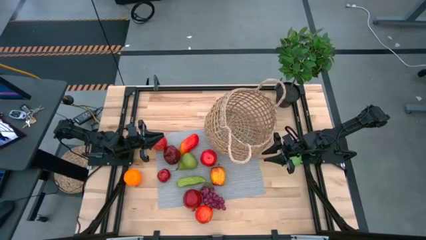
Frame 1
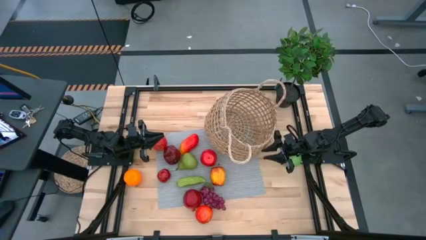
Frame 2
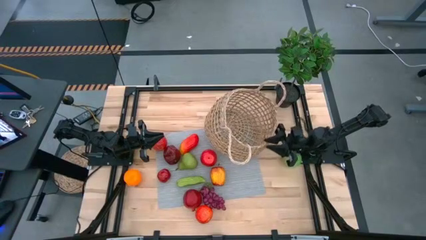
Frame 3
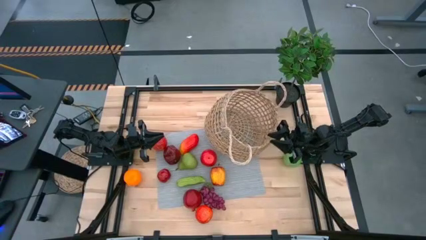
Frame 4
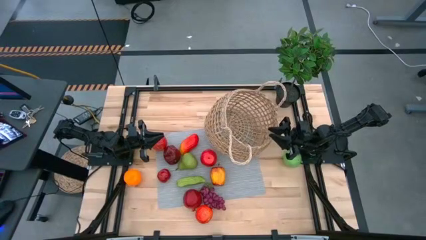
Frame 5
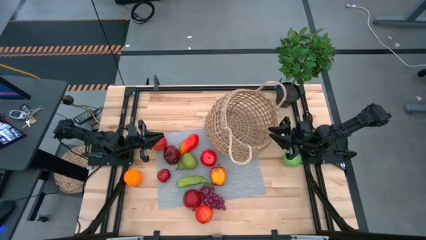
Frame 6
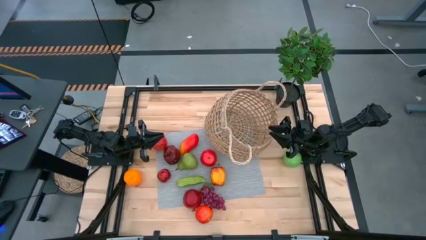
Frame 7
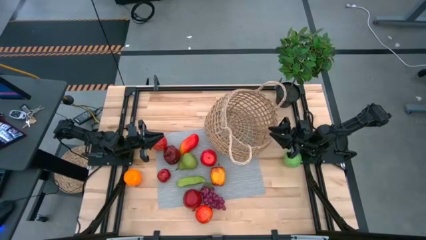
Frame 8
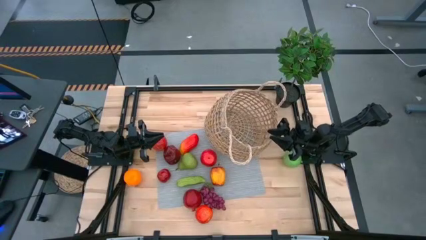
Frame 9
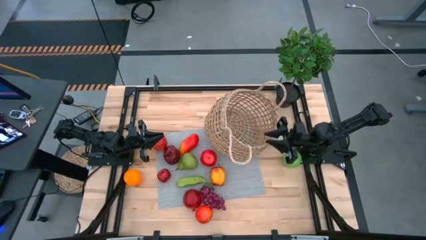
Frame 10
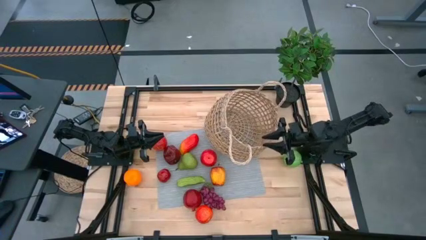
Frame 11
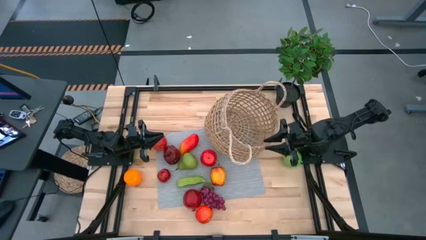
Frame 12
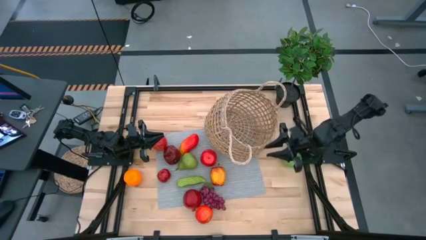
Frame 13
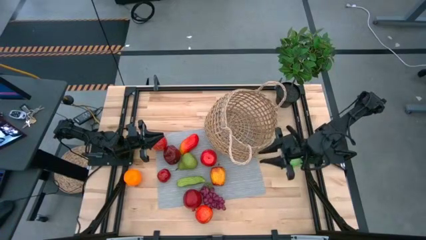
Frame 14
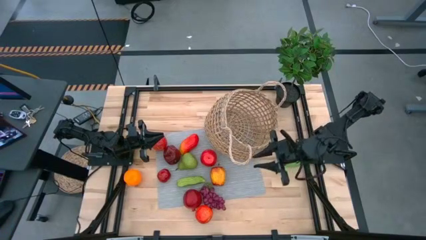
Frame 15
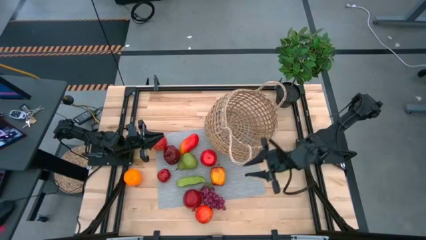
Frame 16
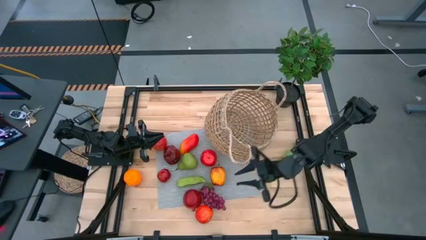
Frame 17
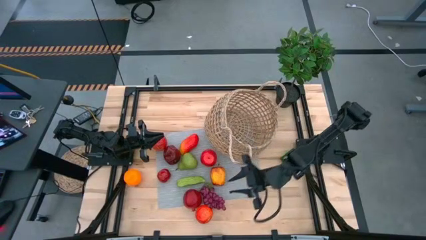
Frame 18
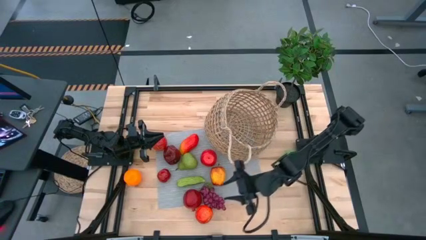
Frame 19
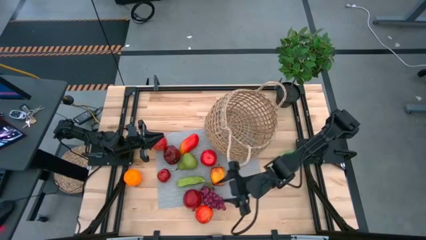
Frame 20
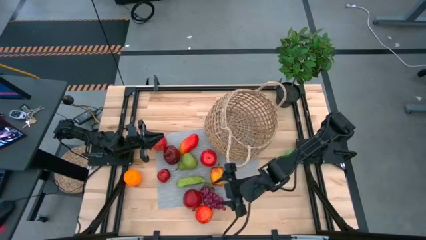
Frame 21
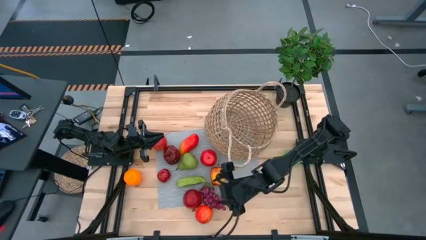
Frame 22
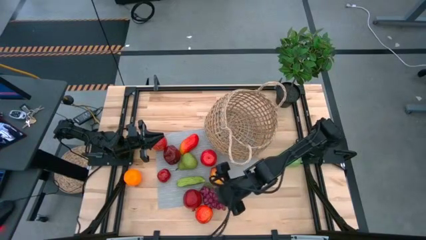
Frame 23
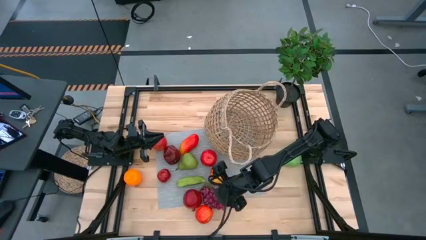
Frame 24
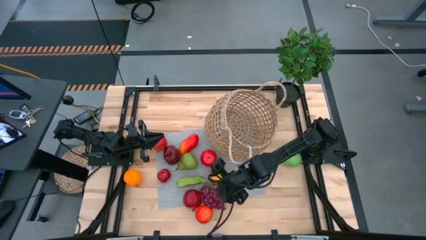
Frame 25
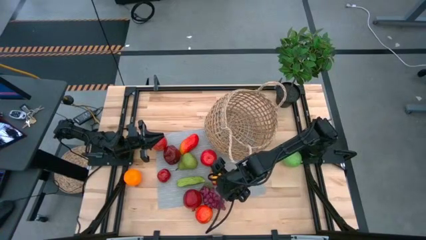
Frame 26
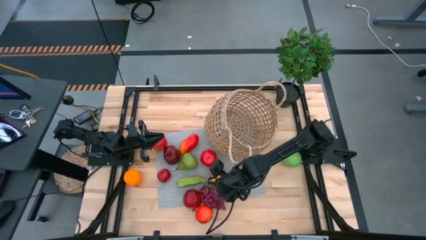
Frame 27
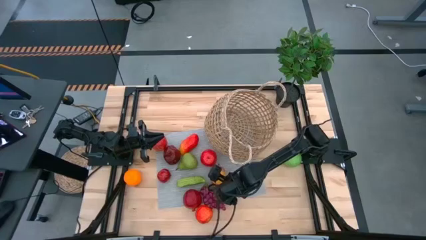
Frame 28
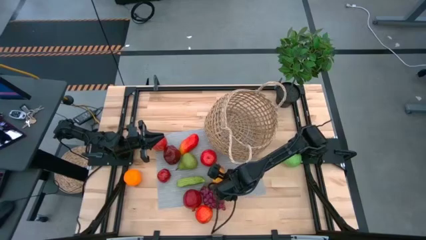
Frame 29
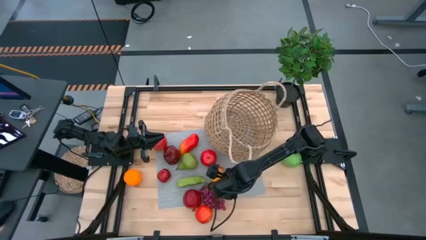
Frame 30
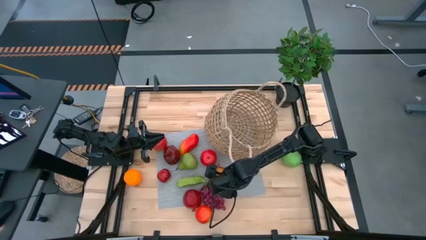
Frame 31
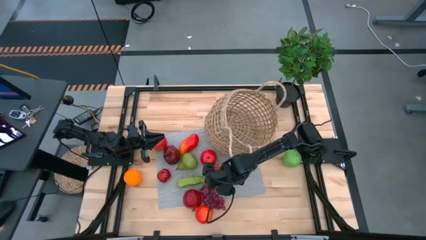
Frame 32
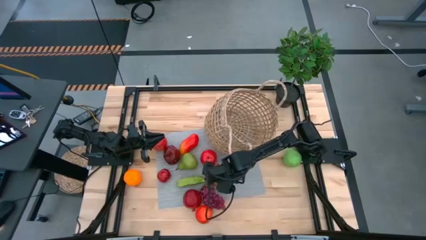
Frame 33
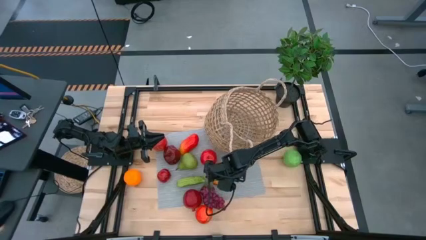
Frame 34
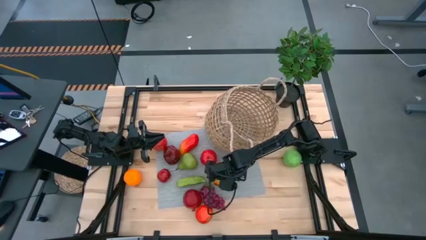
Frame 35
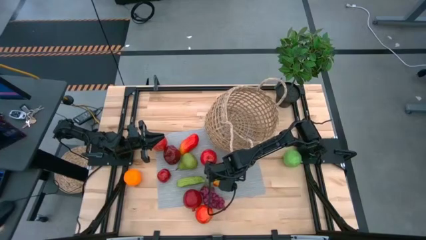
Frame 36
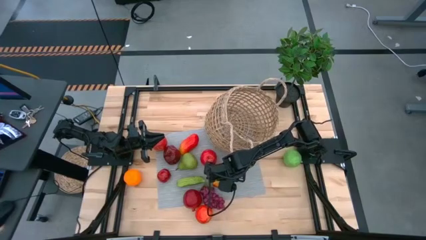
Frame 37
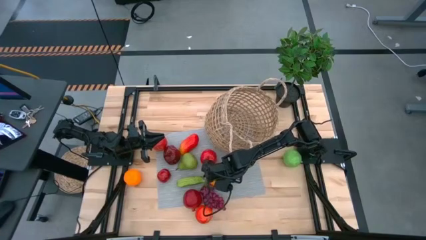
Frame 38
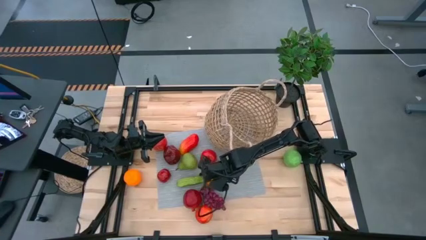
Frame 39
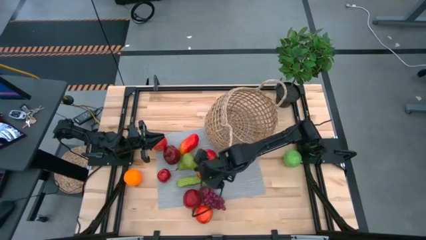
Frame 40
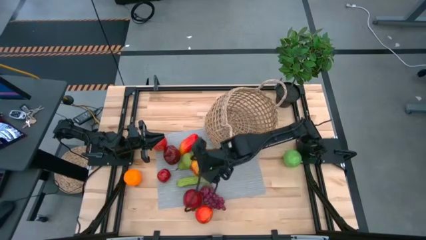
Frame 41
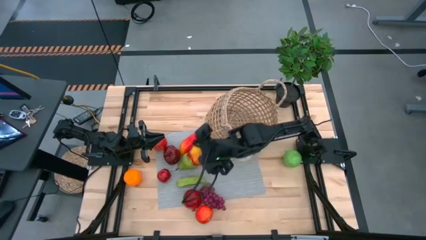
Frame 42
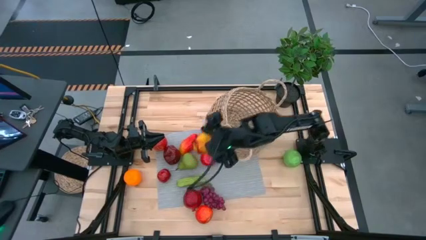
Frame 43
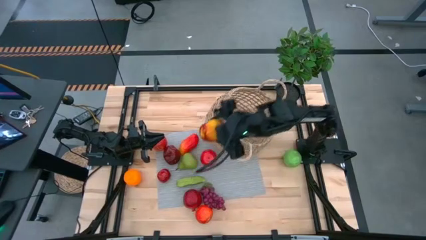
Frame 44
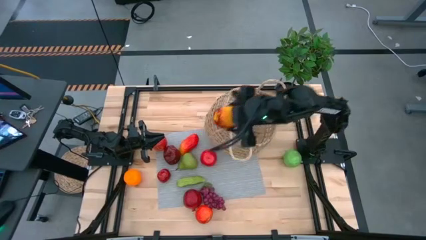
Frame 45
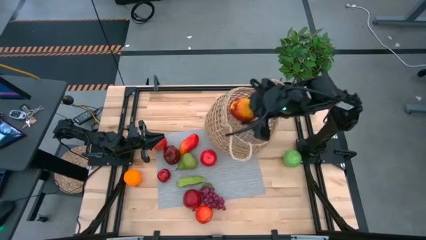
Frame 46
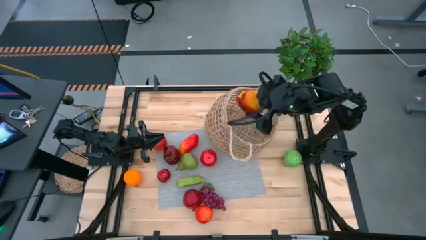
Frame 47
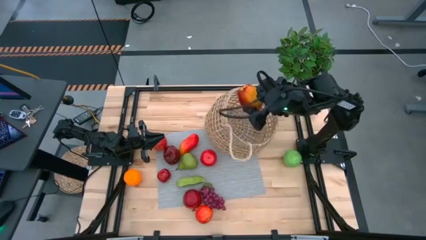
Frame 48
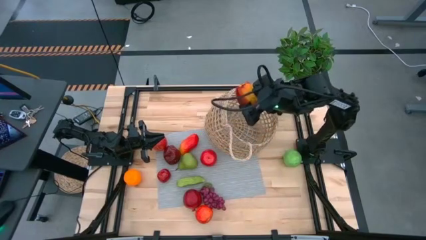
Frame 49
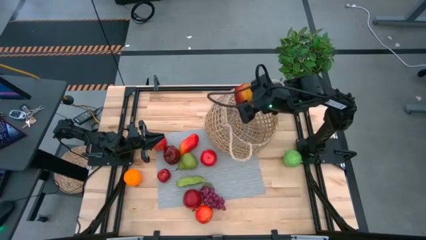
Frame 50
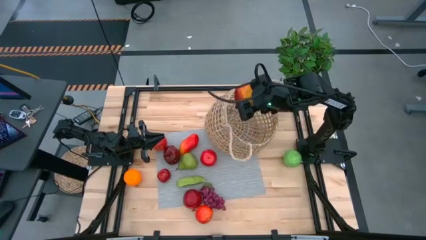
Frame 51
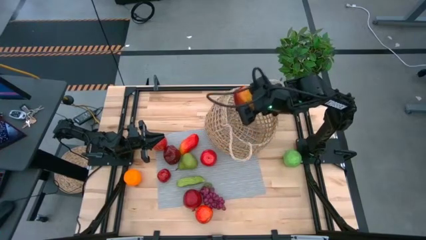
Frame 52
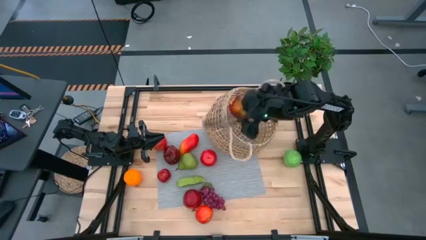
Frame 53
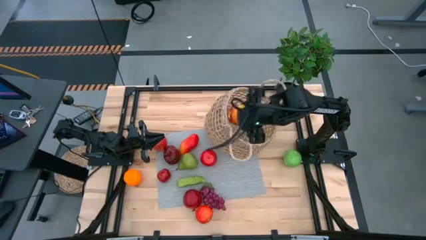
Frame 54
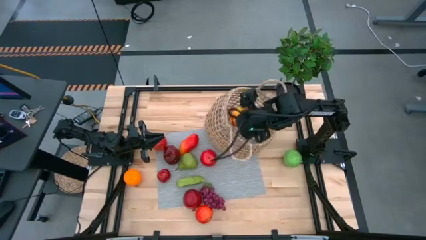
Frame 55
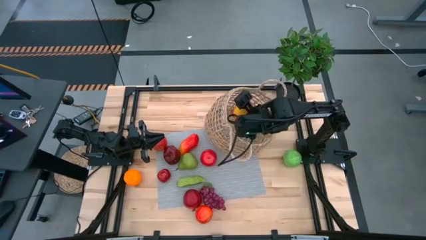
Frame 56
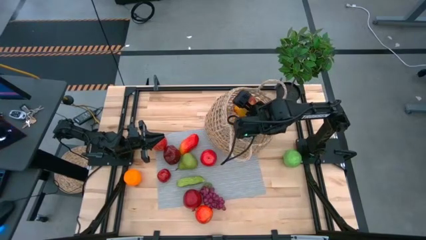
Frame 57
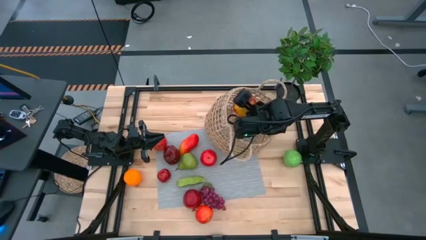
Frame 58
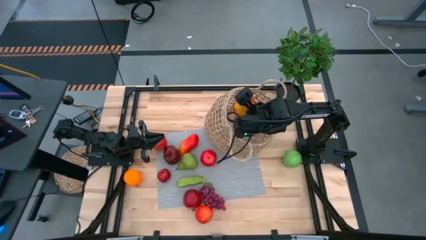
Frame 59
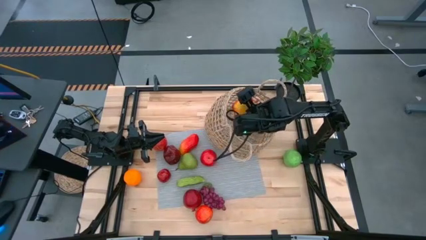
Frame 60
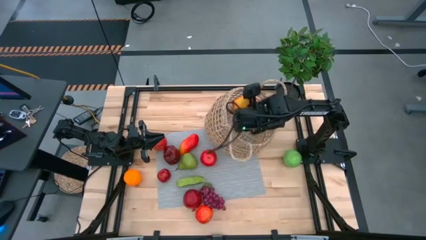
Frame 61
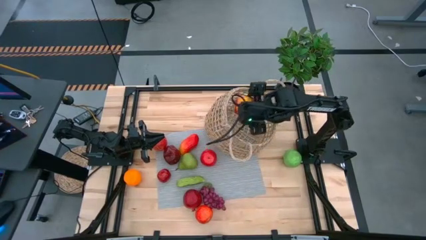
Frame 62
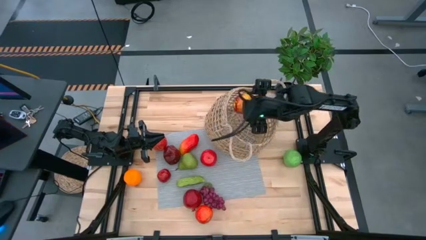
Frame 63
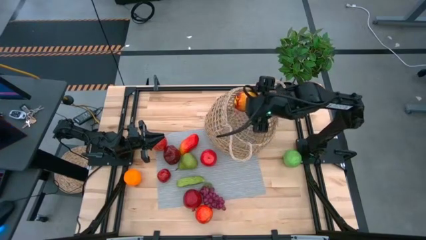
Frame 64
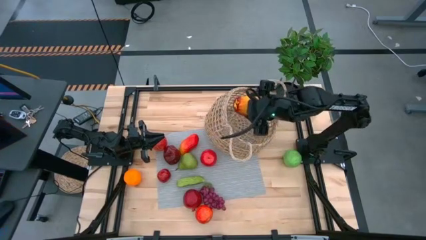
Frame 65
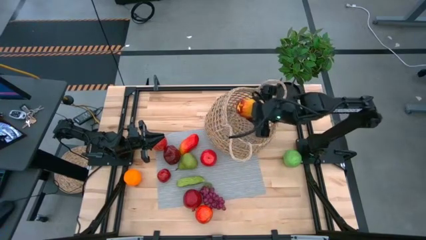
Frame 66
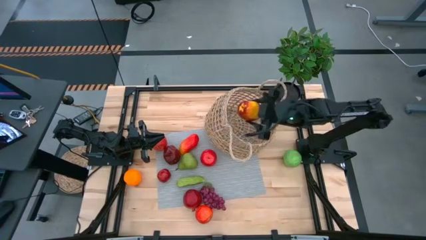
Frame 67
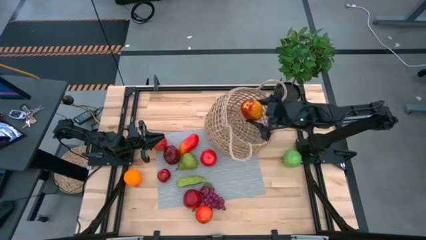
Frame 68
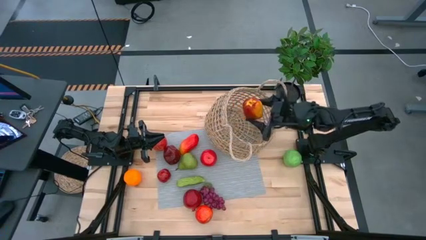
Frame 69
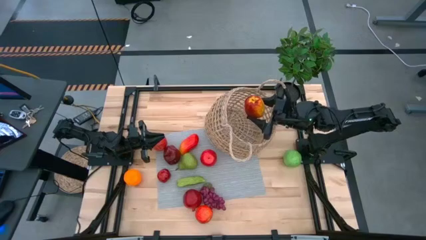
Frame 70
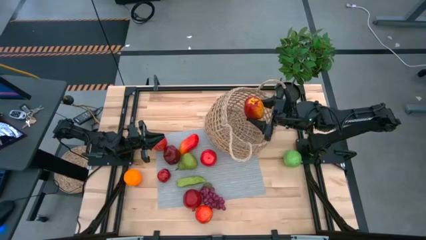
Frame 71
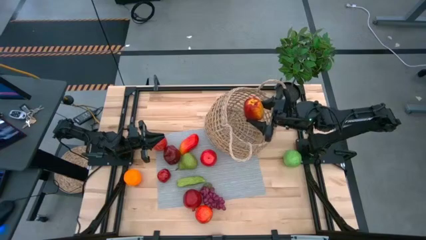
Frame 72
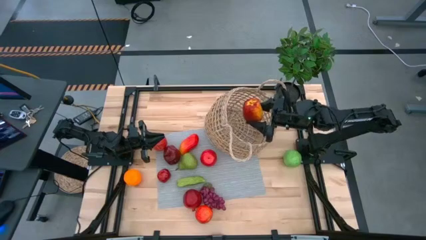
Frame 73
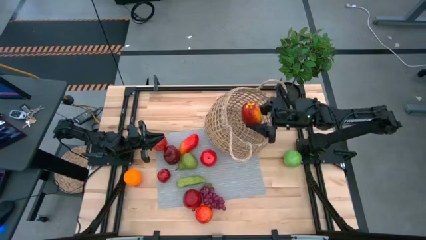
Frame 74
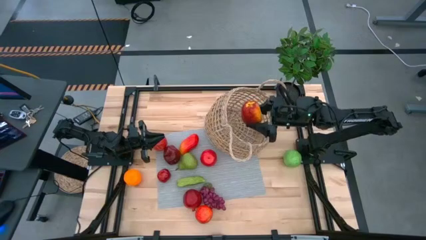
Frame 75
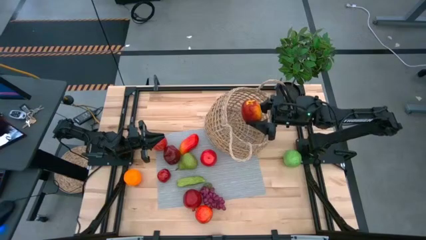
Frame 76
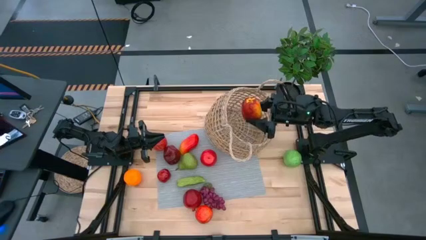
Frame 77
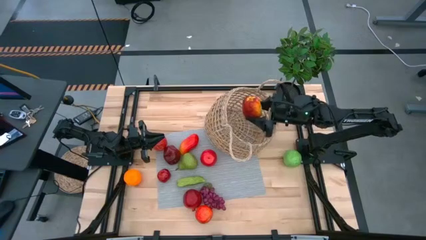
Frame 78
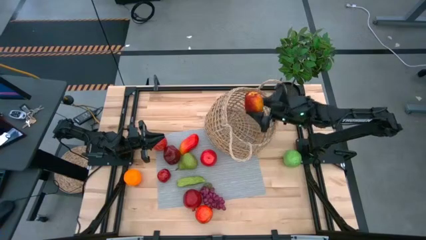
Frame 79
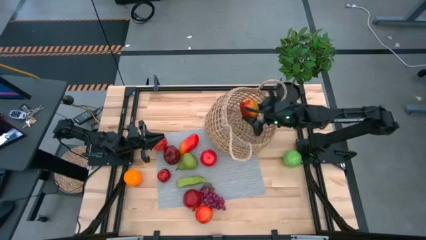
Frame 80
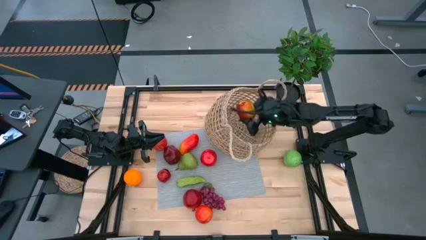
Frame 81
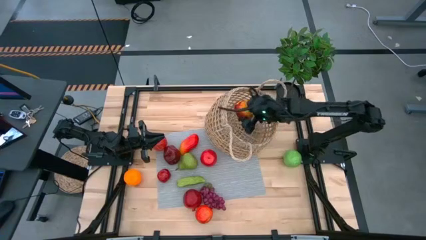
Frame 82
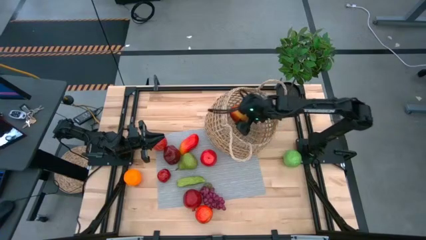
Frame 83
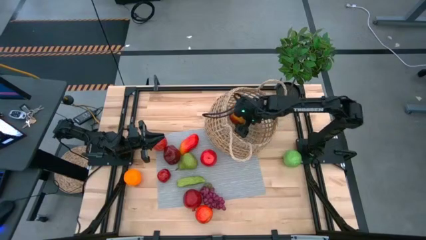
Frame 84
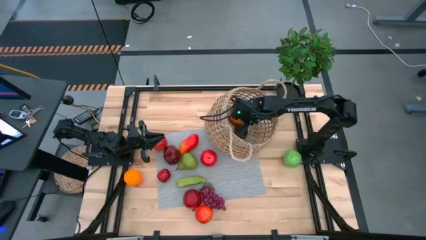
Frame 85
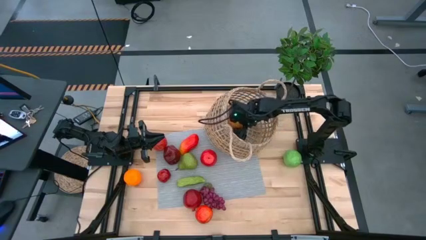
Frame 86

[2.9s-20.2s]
Task: Build produce basket
Put the yellow apple into the brown basket
